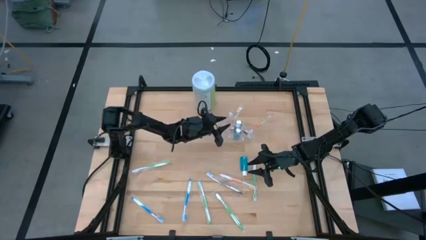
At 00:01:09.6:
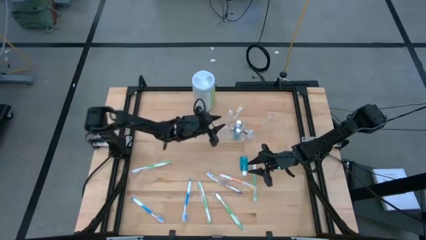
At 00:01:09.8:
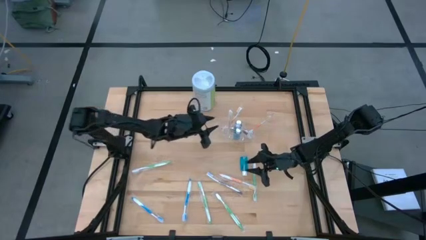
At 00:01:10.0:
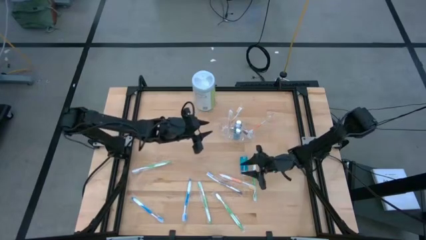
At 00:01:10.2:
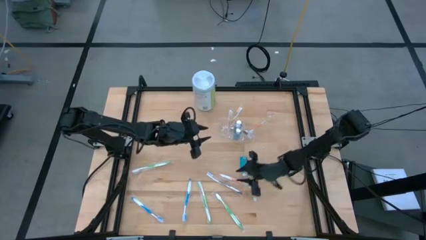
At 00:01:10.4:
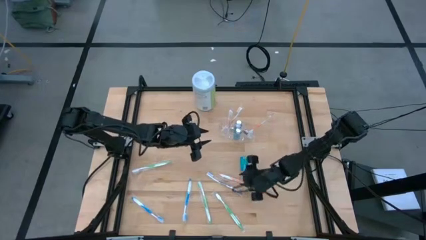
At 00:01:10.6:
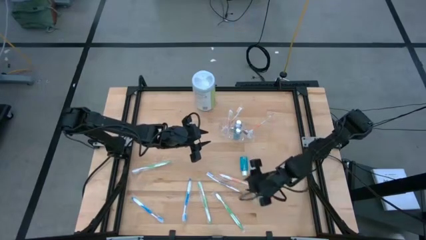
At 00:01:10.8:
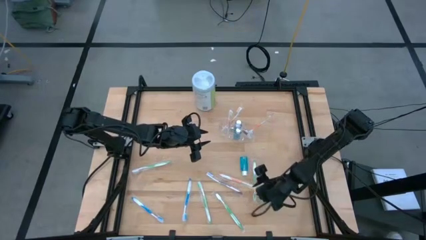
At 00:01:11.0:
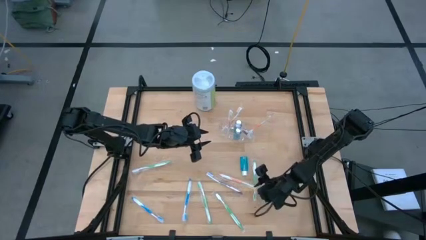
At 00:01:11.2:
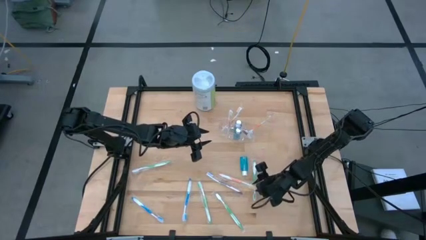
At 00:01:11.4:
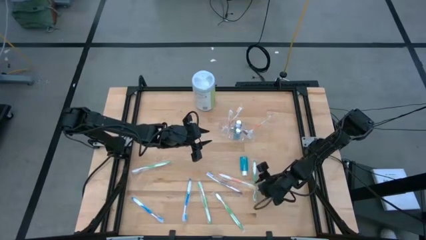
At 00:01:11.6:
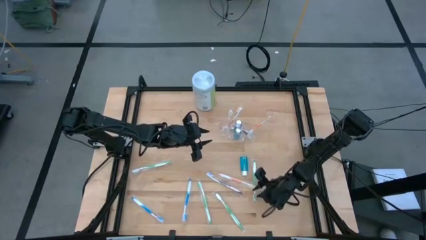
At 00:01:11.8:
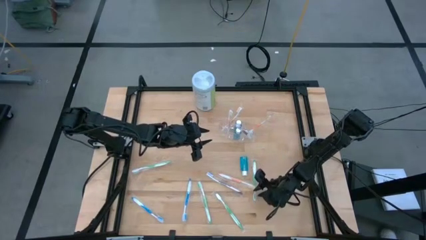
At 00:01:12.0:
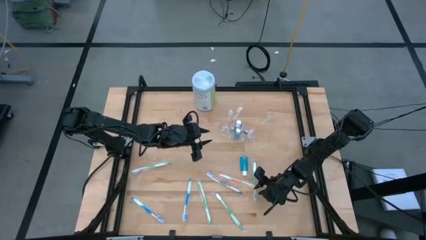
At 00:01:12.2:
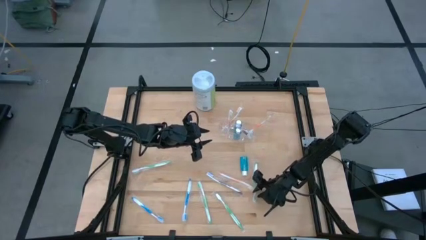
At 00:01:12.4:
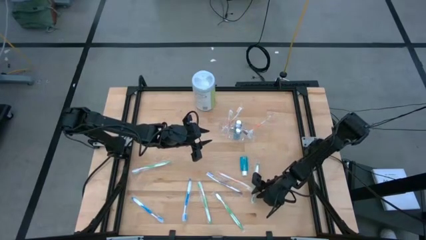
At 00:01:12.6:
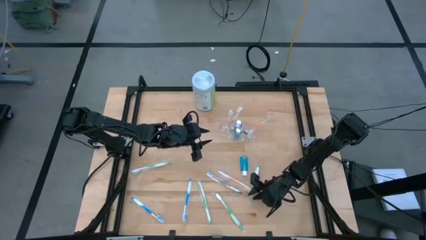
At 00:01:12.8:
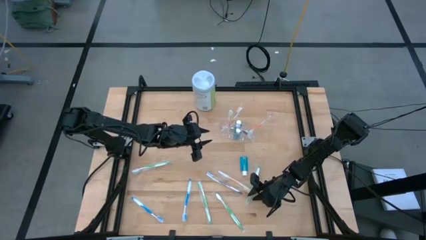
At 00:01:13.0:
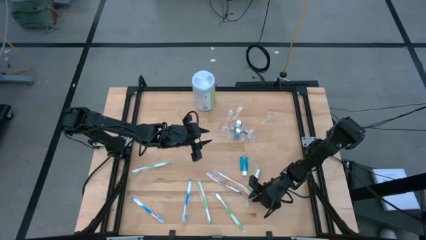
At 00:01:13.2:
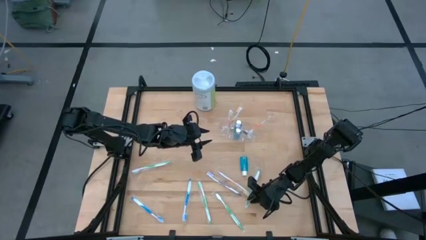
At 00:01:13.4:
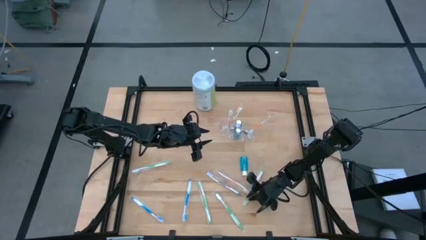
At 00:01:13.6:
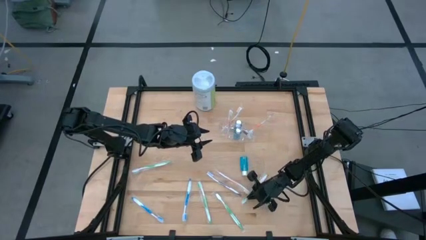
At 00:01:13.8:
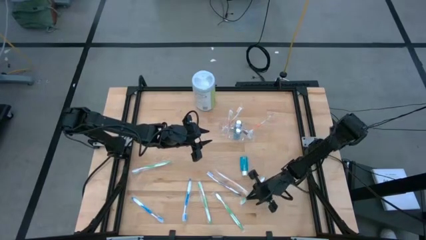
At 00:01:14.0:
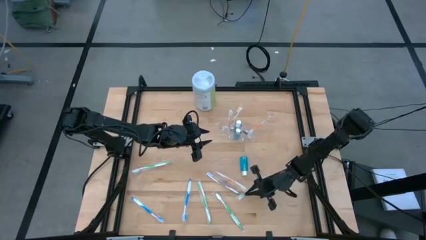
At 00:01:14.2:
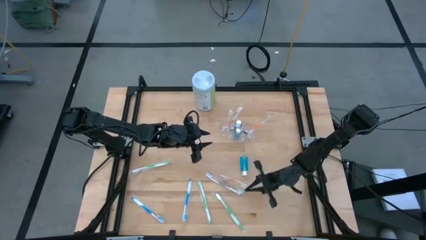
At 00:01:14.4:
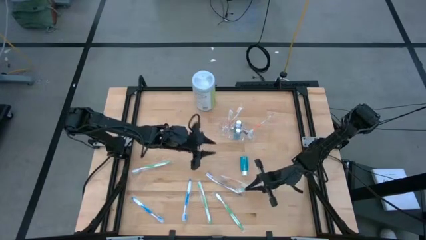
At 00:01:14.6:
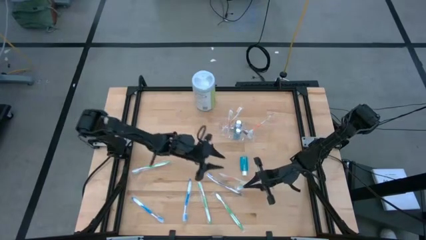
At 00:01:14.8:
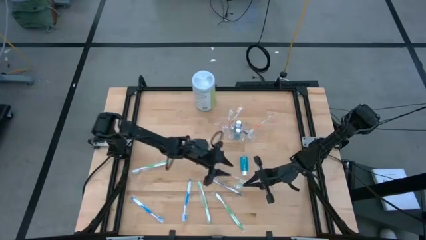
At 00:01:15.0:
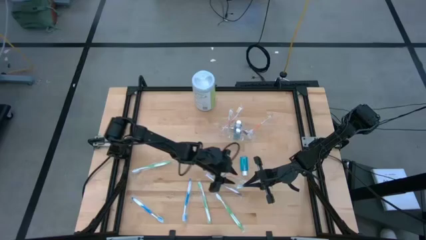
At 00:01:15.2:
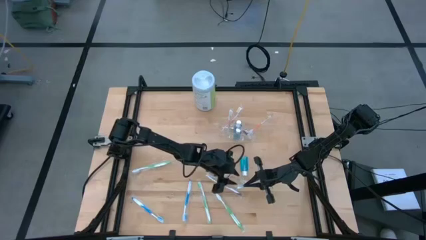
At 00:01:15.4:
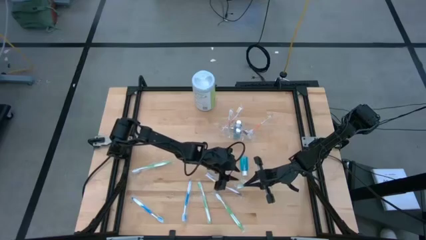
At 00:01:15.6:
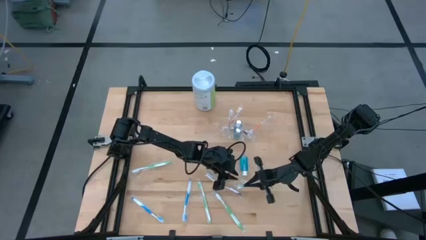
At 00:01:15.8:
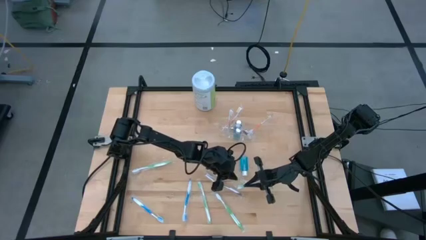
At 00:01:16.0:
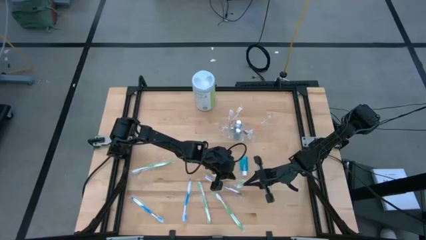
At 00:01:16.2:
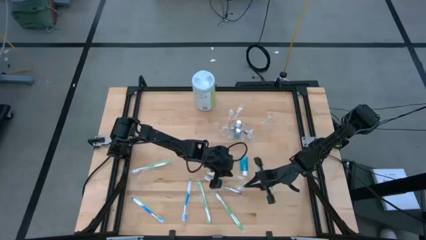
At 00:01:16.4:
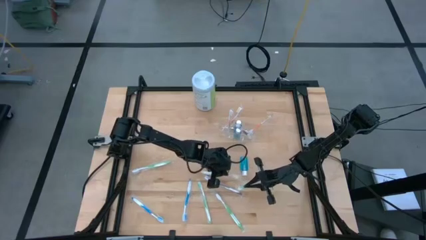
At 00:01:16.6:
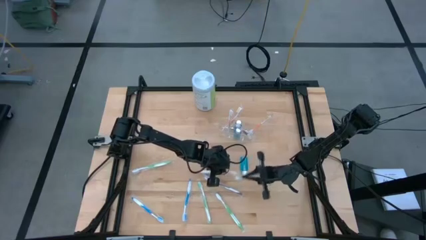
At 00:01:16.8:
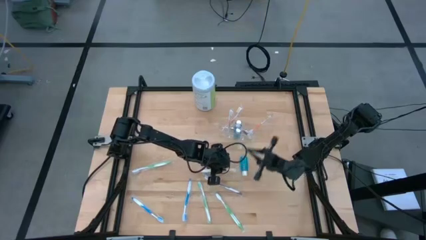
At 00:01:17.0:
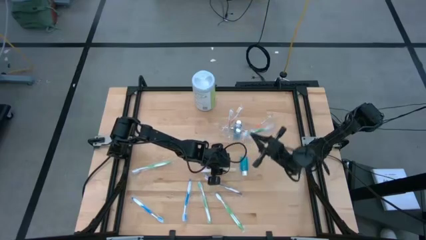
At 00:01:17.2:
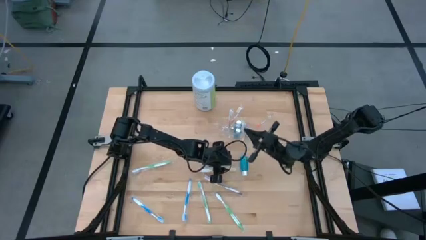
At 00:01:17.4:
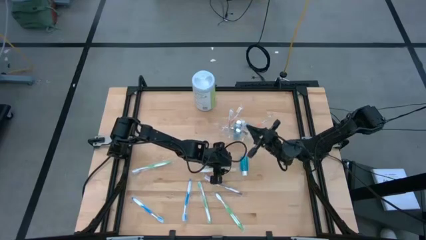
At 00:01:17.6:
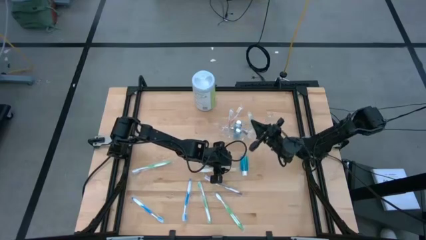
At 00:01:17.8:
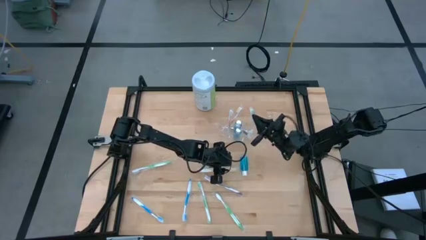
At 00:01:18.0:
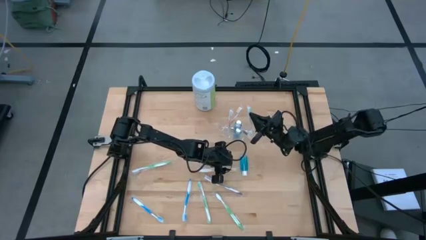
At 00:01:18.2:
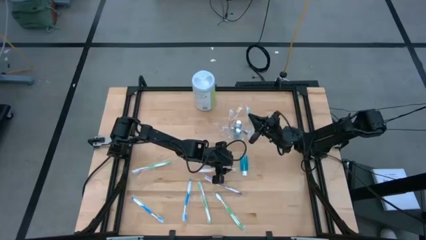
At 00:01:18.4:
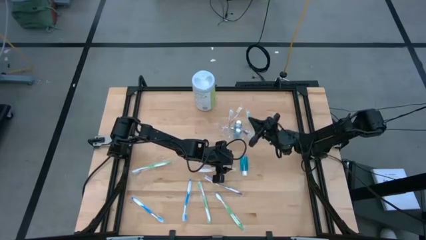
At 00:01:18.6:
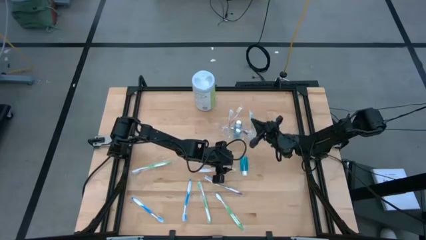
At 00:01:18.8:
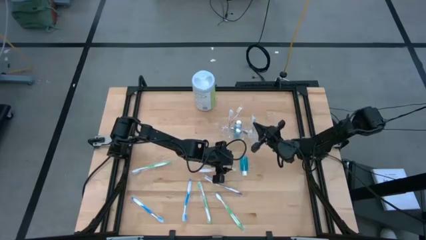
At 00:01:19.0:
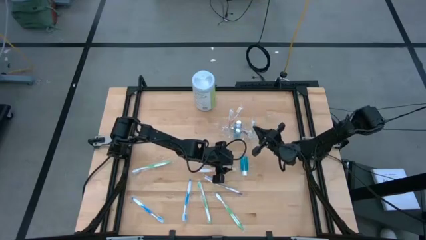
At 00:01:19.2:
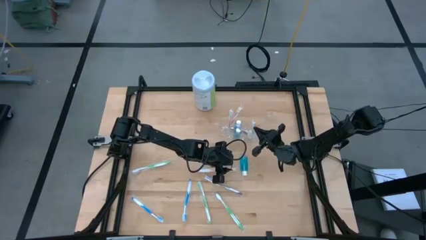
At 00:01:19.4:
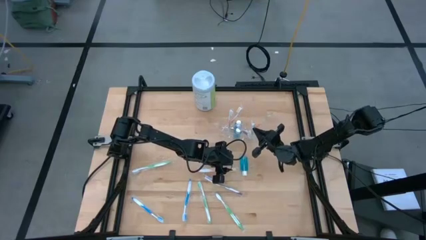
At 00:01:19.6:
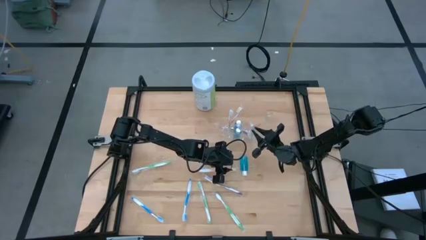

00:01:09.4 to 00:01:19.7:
Task: Pick & Place toothbrushing station
Put the green toothbrush into the transparent organizer

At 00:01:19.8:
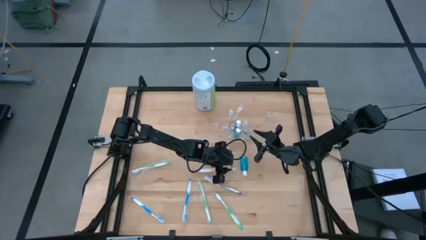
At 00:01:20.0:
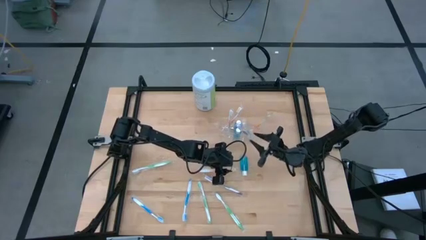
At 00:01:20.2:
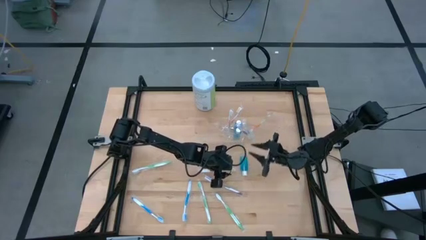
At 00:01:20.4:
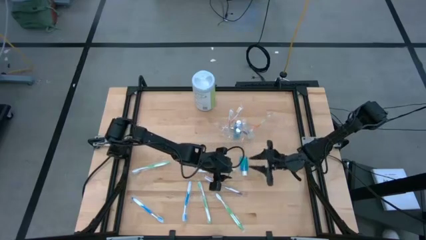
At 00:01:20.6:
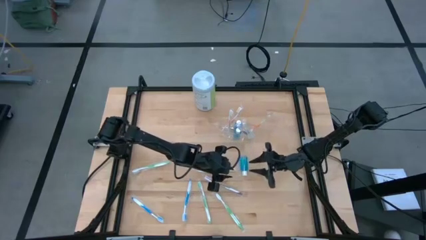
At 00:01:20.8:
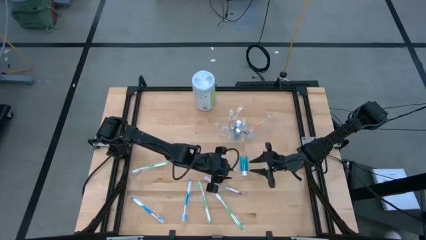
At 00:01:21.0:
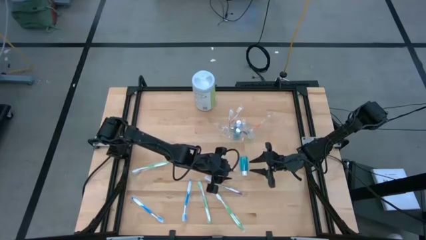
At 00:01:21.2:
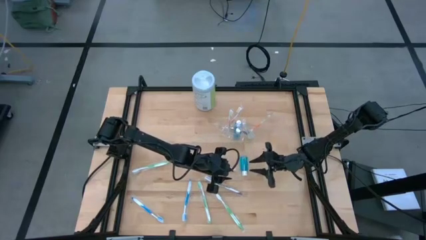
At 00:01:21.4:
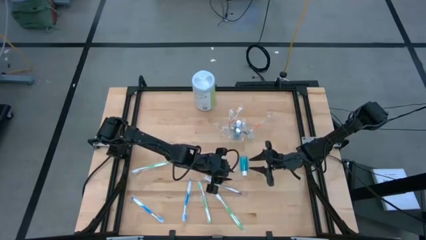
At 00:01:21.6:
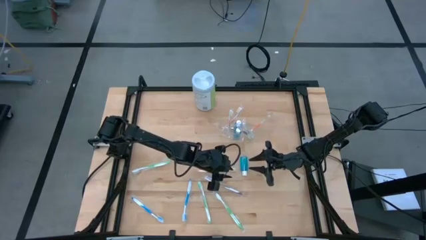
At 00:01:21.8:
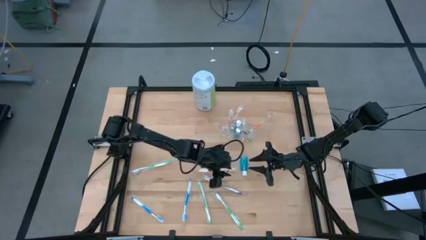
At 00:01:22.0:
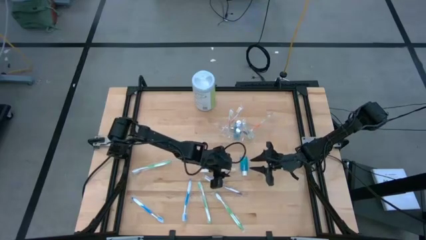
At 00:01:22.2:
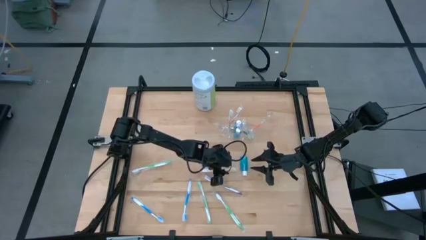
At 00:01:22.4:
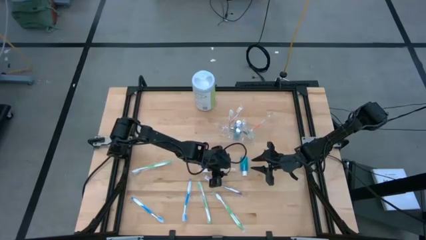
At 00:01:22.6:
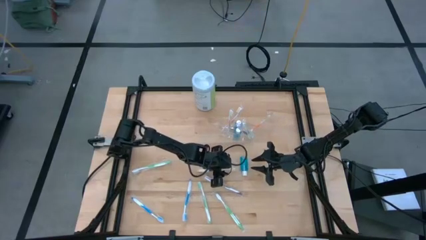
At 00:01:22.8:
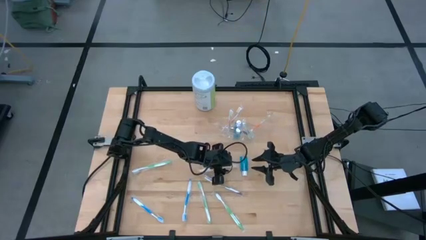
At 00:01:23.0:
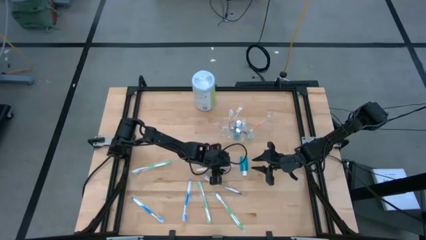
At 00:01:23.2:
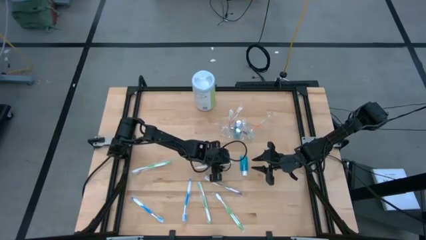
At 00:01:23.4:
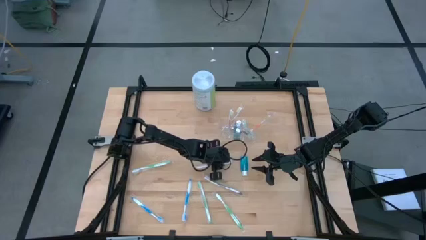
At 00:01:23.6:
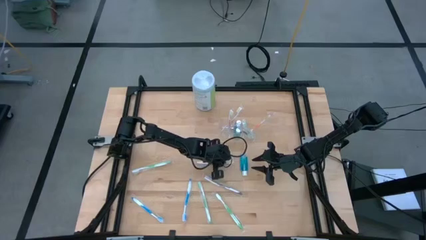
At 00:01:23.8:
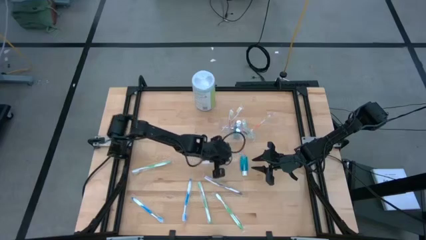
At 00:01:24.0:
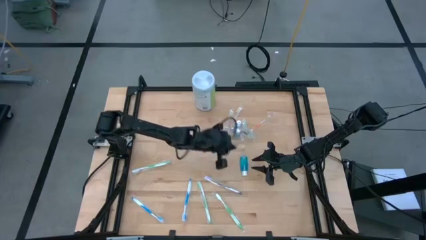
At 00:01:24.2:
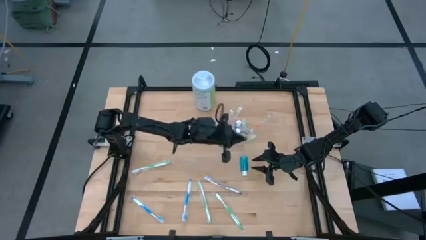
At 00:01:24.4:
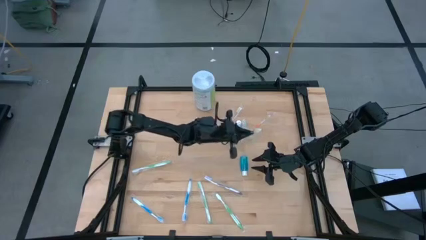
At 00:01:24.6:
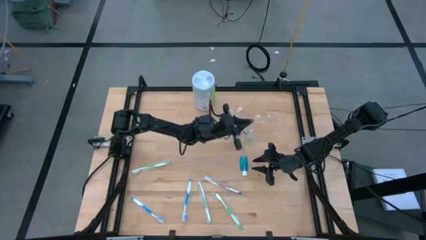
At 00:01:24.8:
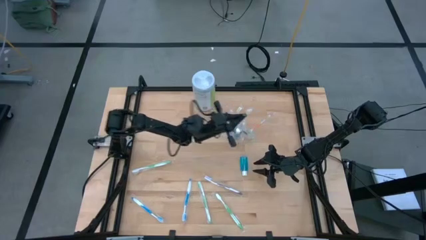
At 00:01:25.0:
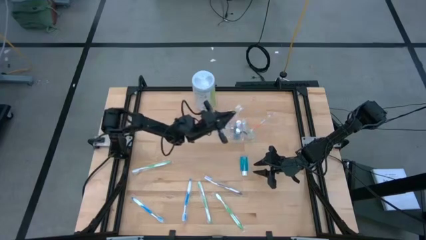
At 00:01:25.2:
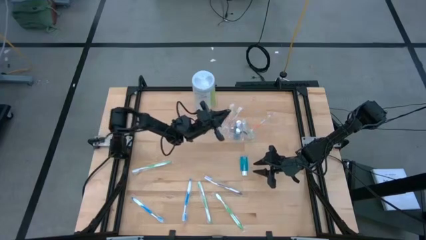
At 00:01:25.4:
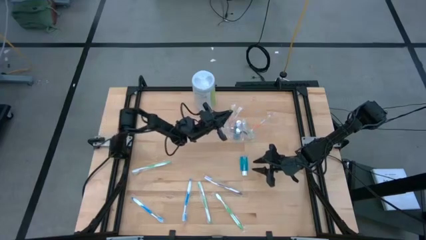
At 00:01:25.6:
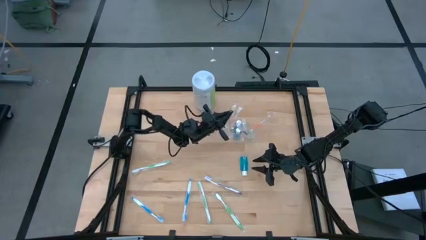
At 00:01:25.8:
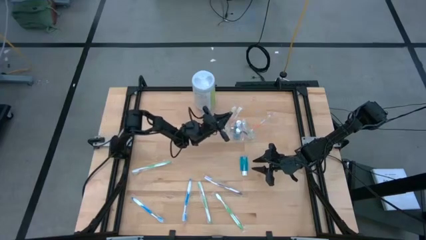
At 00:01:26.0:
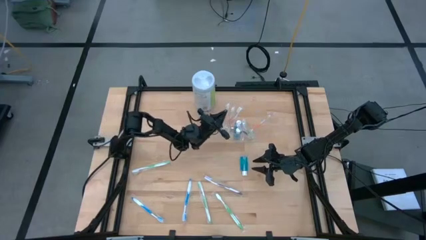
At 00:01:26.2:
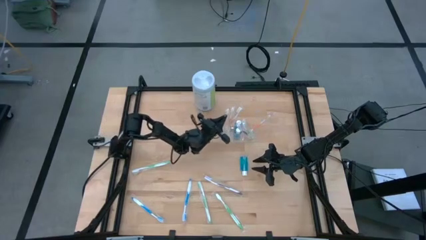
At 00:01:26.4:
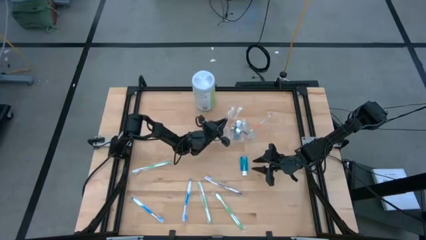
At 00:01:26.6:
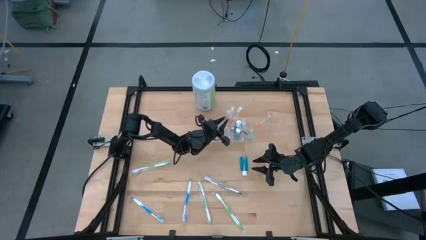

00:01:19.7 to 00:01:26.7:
Put the orange toothbrush into the transparent organizer
